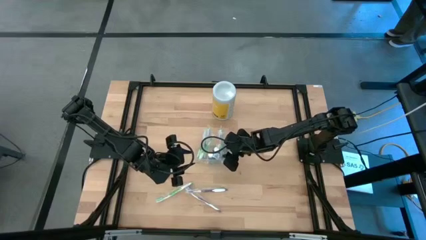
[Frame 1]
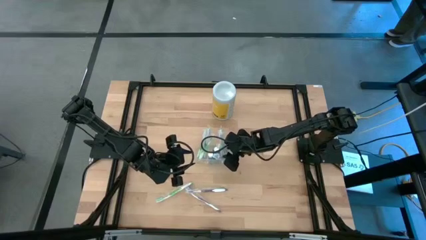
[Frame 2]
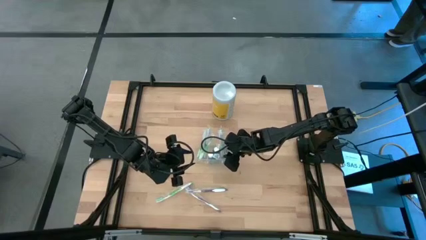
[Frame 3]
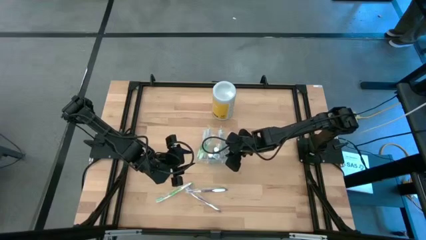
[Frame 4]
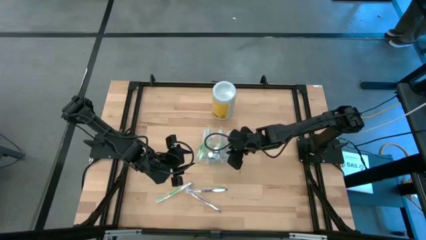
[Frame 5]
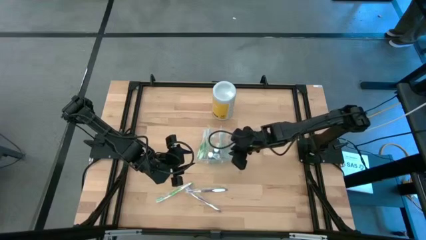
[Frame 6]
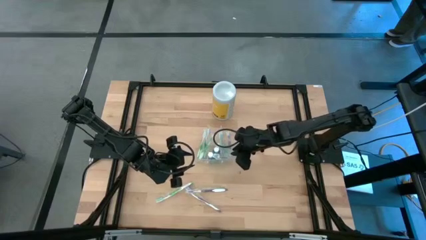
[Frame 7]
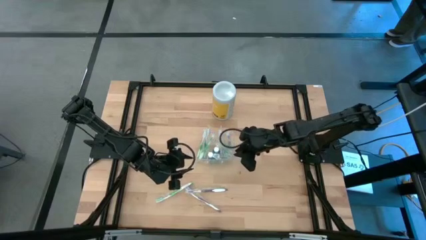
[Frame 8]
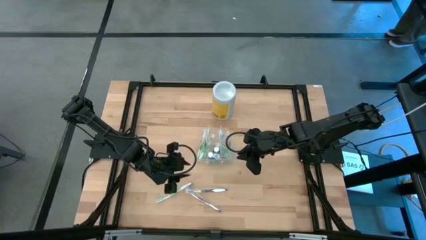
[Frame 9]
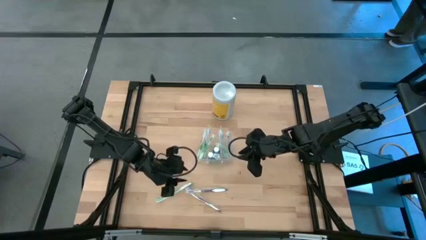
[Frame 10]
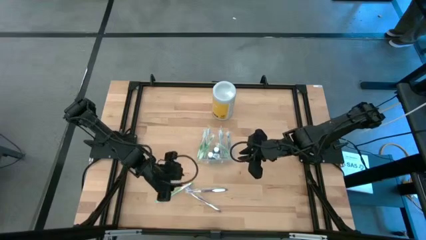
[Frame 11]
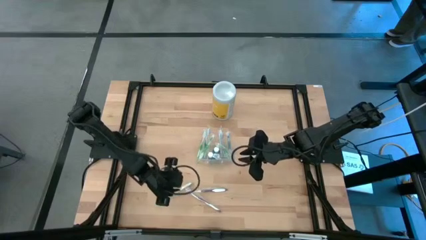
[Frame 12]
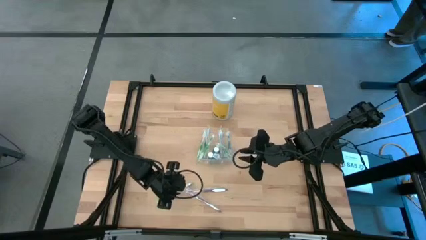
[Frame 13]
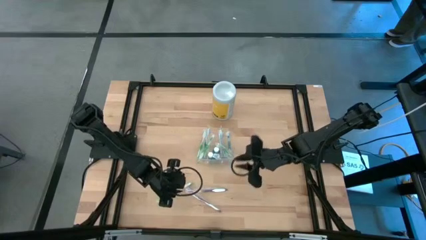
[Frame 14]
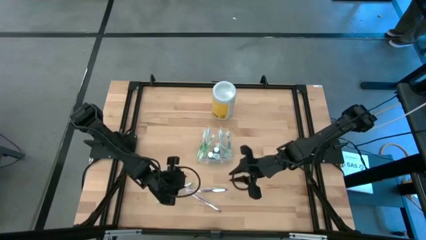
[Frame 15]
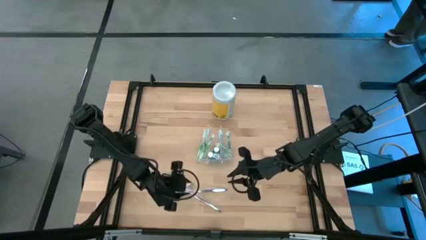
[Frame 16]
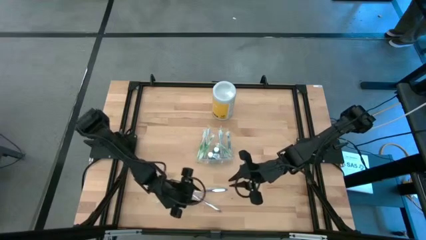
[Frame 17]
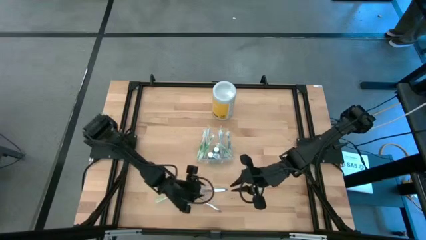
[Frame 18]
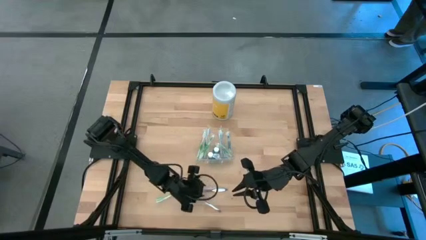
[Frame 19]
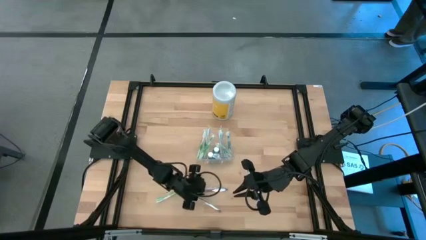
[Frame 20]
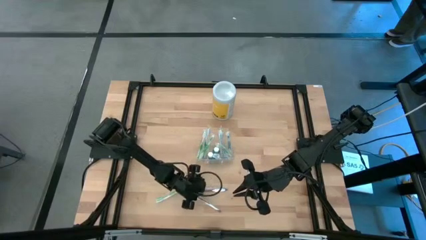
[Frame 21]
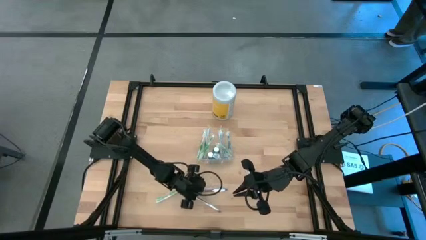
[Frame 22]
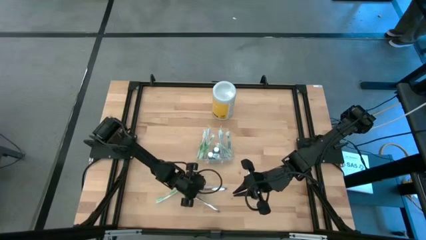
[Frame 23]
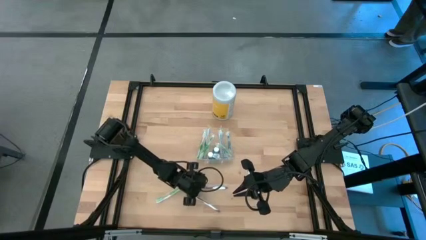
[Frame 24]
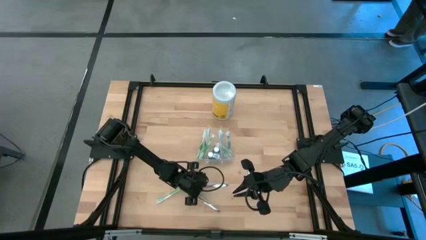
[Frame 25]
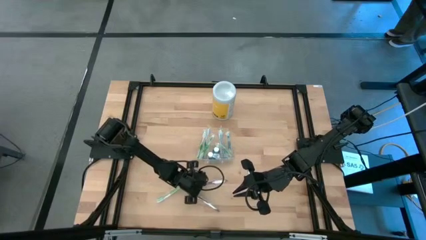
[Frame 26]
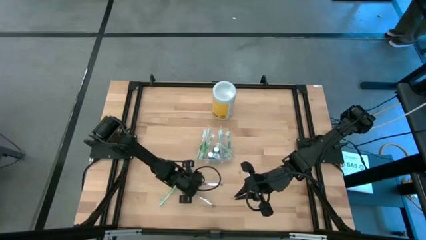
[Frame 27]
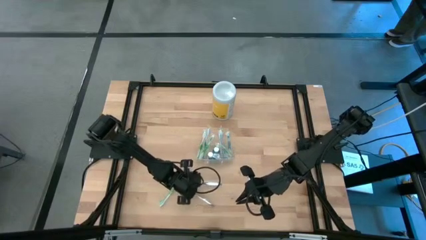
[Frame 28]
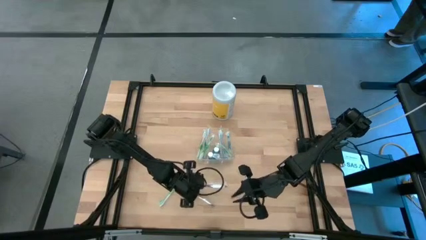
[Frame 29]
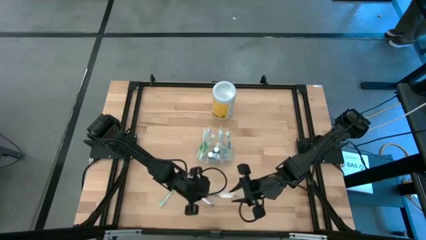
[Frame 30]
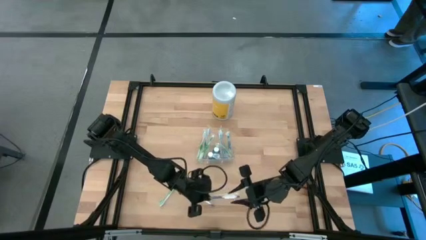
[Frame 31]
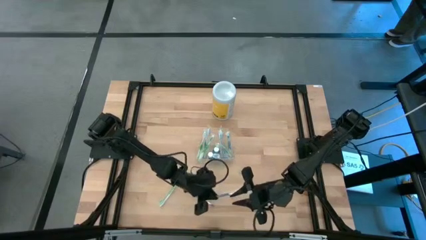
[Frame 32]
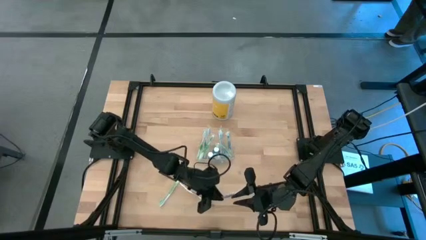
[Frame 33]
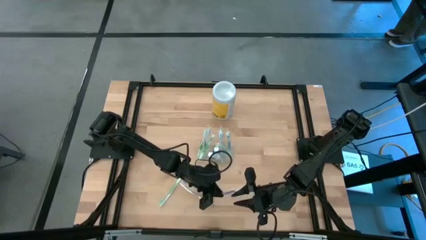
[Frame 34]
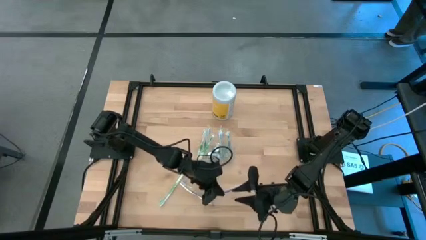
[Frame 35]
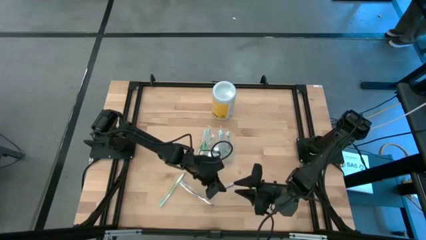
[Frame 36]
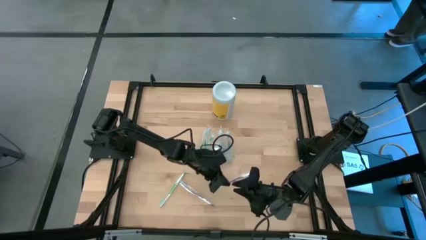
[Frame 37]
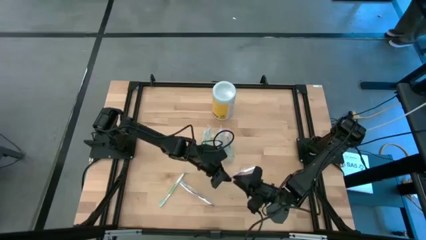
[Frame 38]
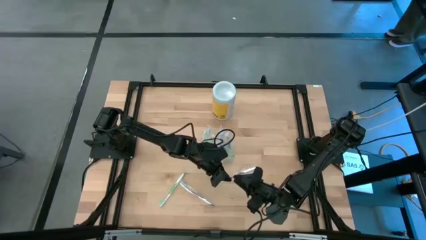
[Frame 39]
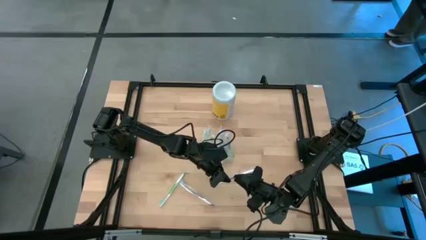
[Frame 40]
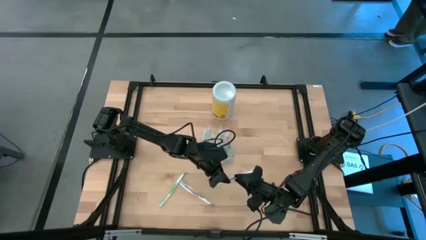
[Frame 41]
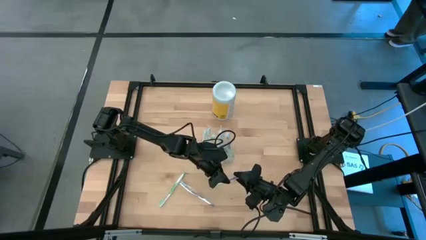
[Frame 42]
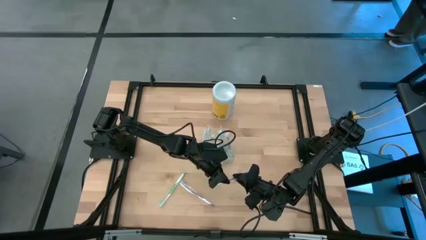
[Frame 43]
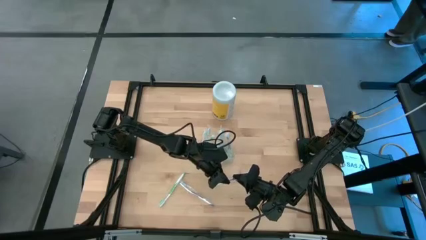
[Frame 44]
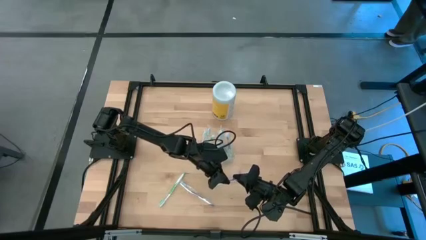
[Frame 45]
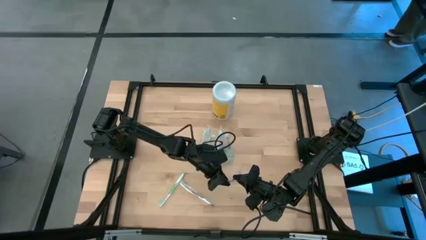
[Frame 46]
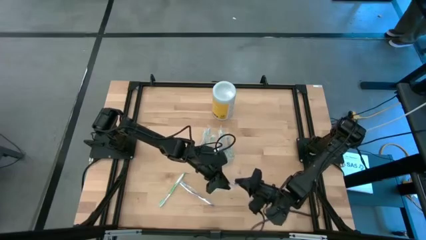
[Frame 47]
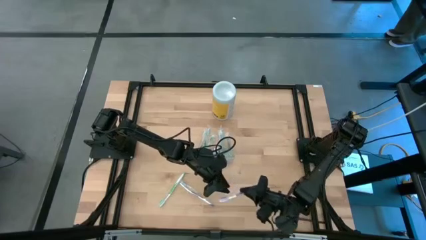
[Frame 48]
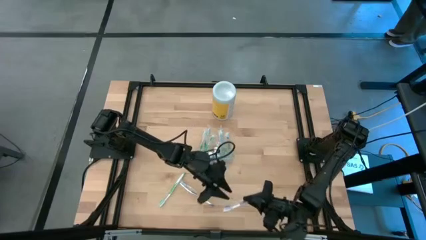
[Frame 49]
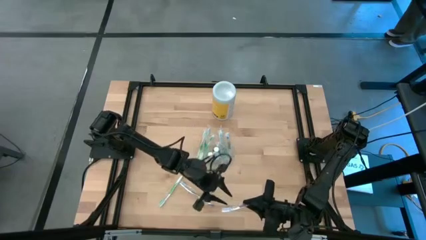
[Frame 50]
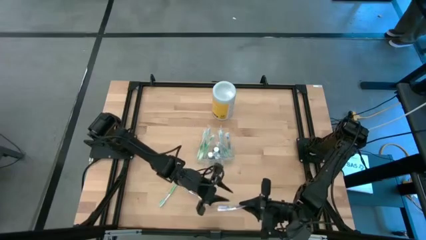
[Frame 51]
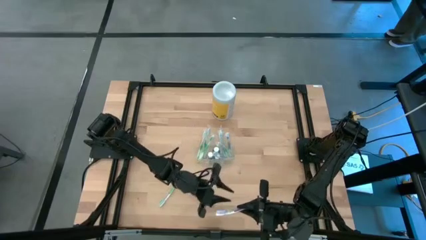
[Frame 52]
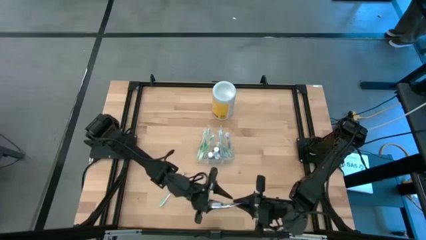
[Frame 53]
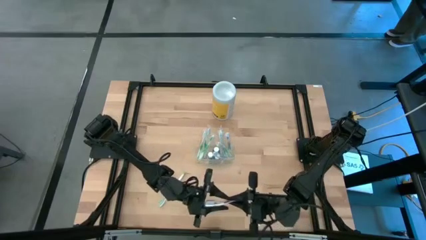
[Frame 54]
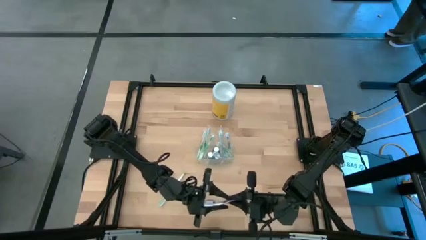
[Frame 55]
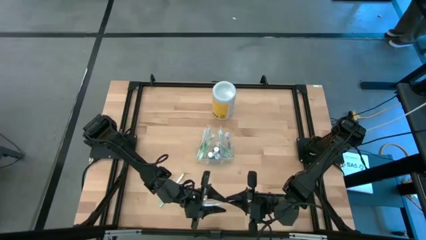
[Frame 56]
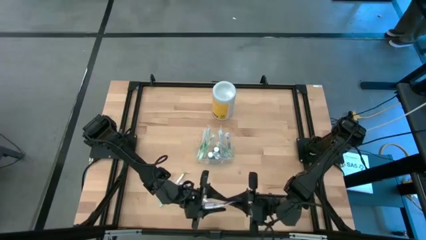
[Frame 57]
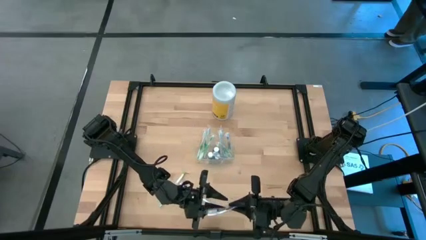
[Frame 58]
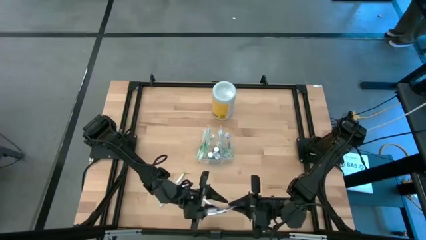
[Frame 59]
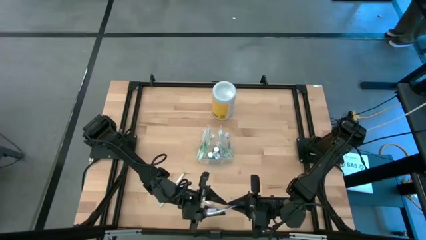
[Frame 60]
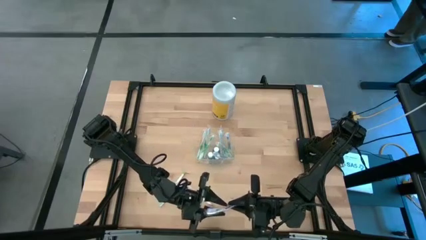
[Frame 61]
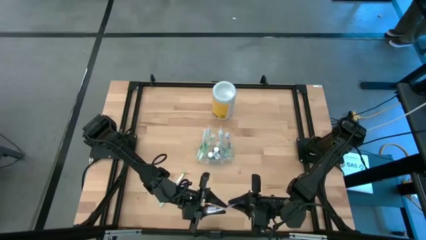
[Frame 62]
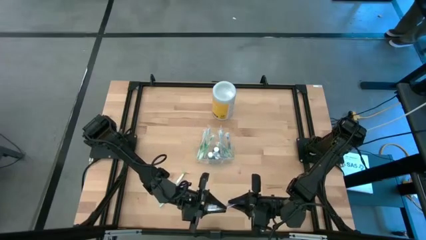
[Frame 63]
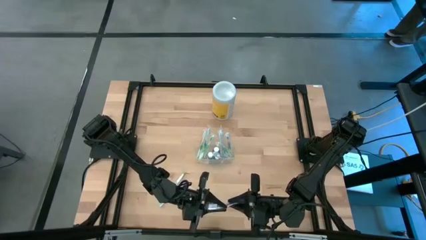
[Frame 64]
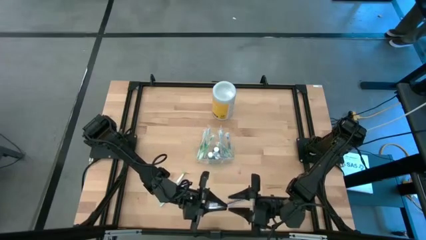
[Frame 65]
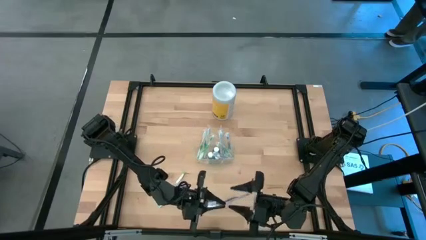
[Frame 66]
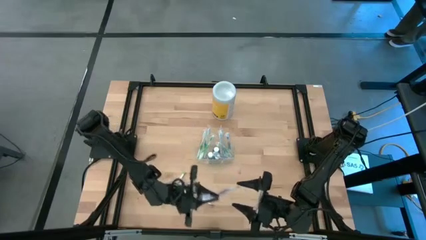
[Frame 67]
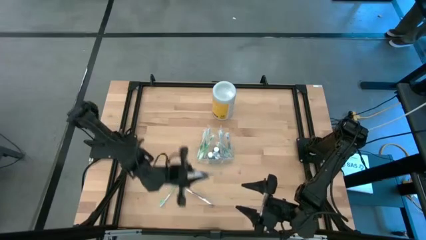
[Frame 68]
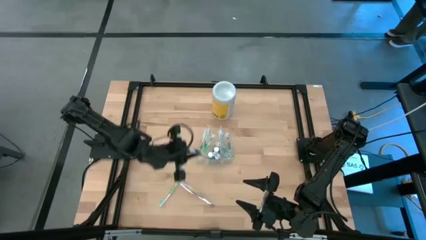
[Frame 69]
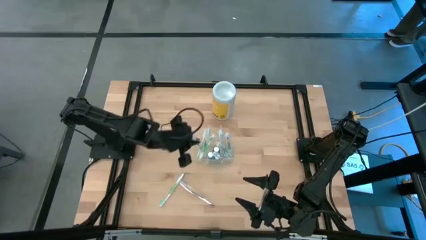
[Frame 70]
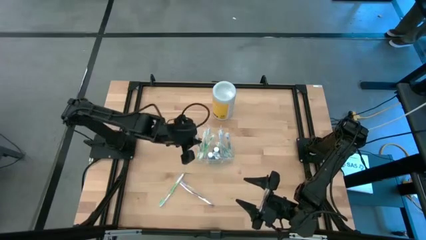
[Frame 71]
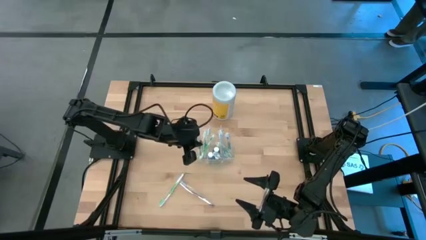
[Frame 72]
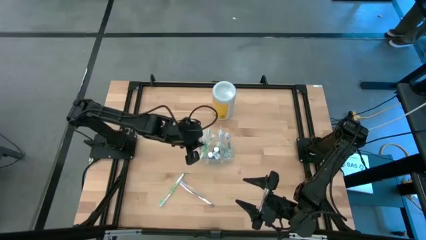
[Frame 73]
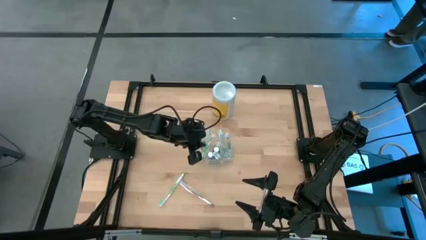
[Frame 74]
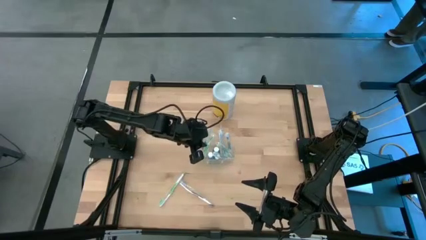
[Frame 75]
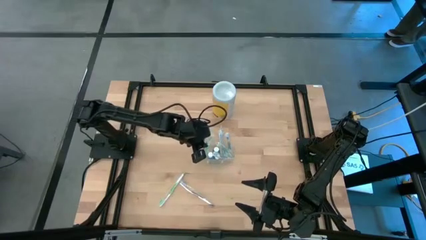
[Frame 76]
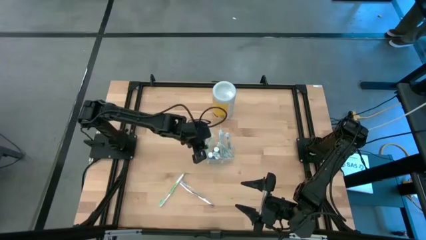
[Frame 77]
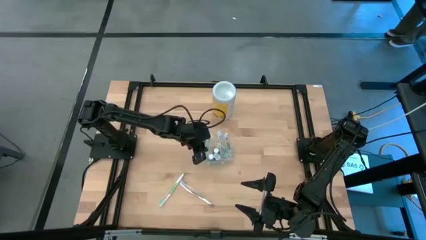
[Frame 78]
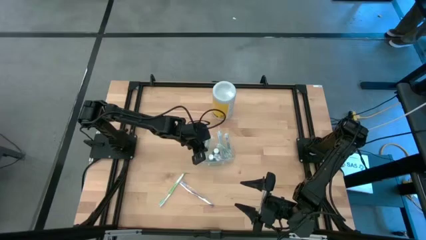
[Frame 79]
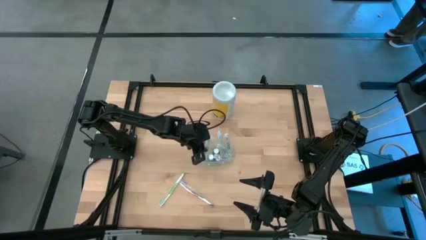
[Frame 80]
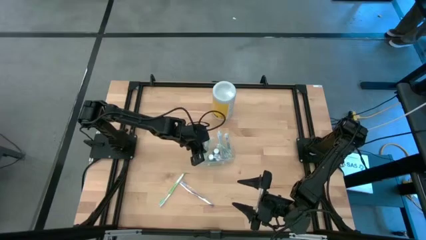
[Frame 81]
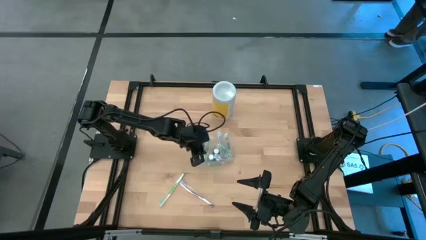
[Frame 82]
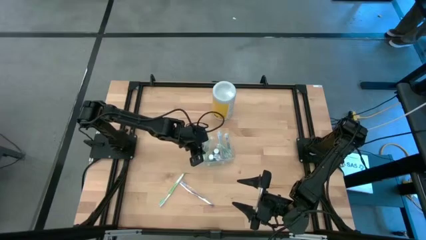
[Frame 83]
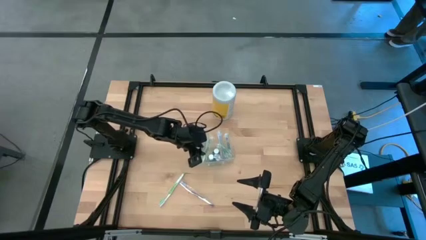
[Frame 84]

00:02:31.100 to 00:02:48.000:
Task: Pick & Place toothbrushing station
Put the purple toothbrush into the transparent organizer
